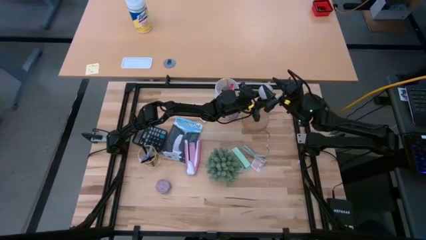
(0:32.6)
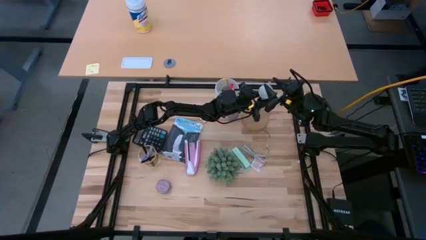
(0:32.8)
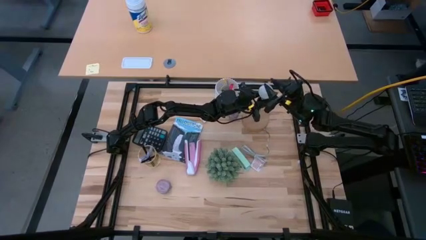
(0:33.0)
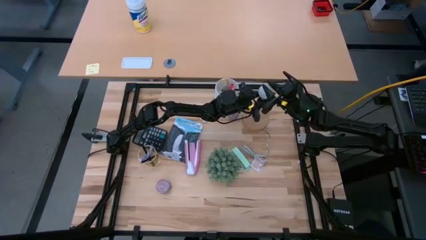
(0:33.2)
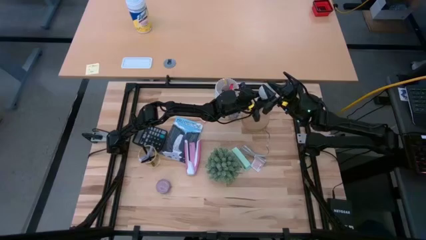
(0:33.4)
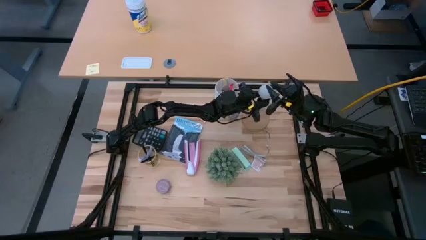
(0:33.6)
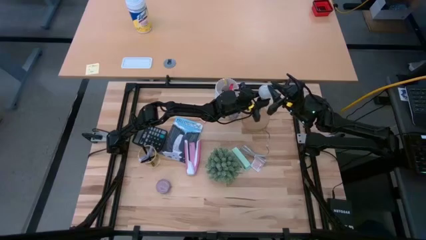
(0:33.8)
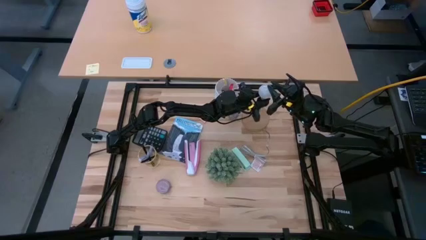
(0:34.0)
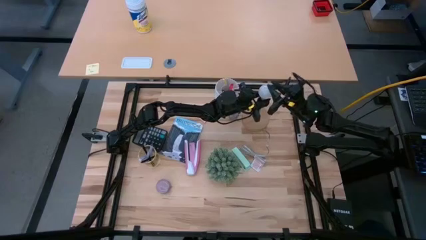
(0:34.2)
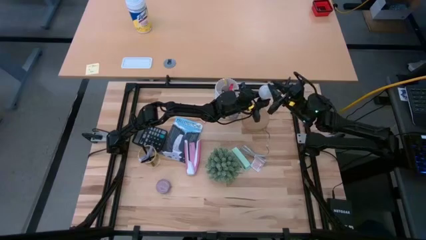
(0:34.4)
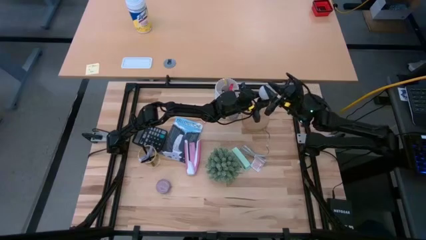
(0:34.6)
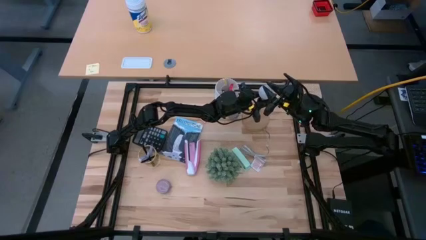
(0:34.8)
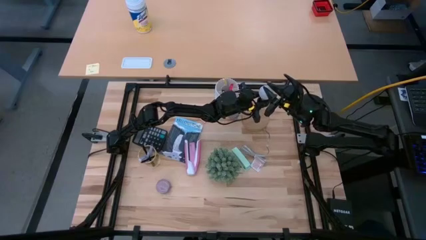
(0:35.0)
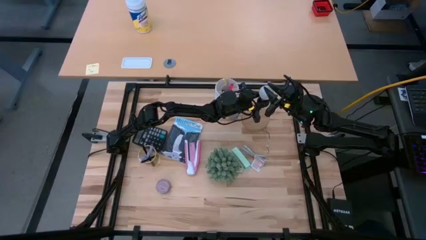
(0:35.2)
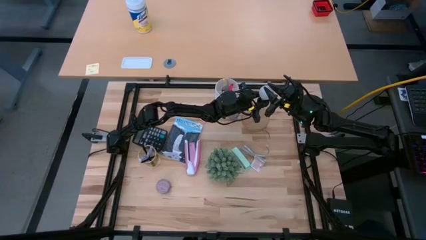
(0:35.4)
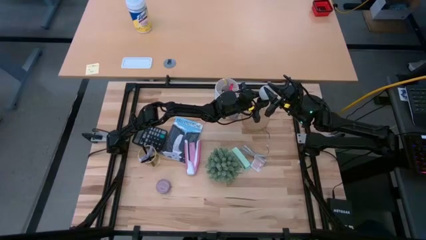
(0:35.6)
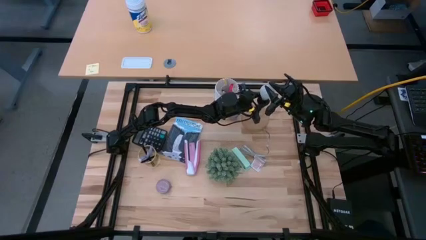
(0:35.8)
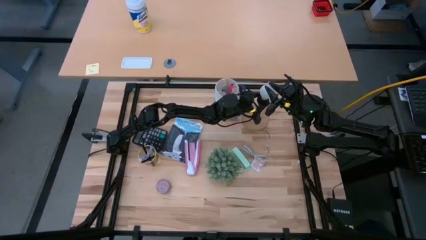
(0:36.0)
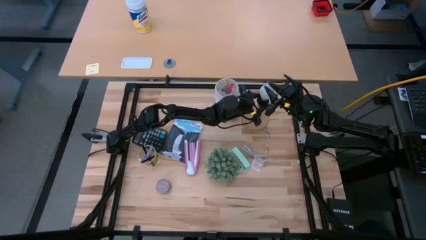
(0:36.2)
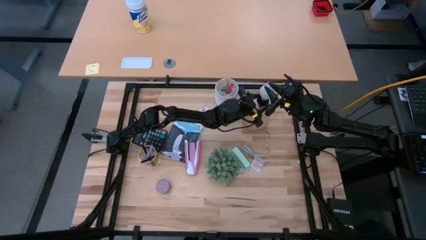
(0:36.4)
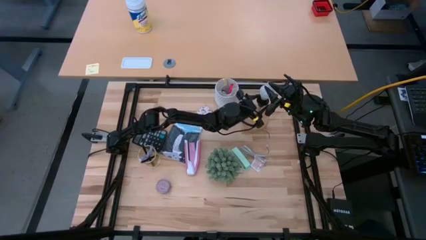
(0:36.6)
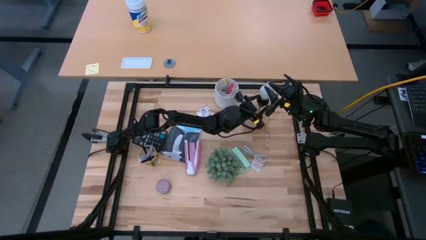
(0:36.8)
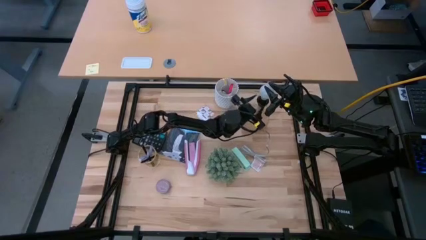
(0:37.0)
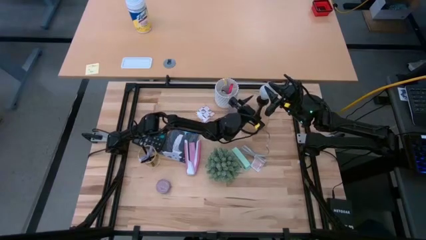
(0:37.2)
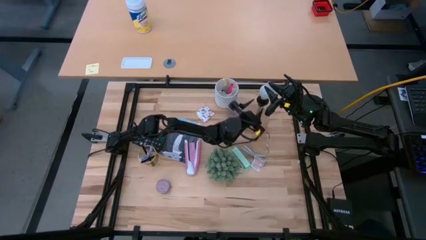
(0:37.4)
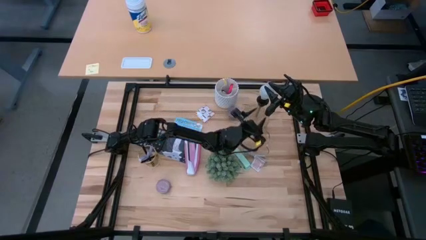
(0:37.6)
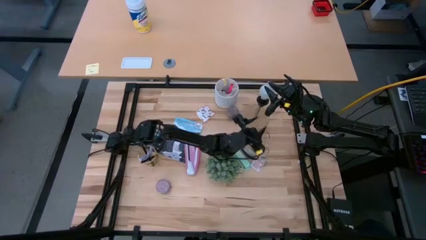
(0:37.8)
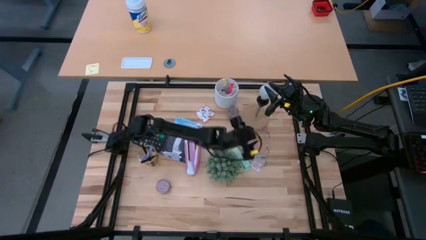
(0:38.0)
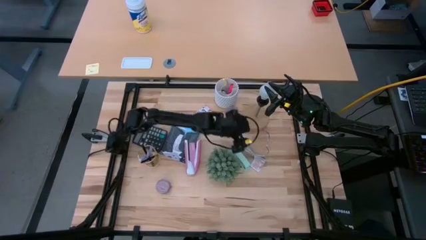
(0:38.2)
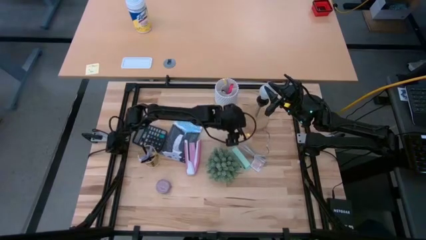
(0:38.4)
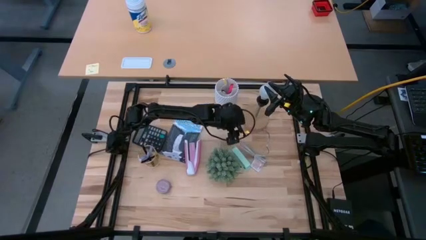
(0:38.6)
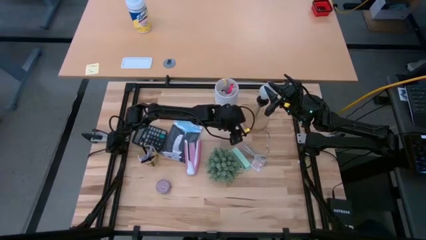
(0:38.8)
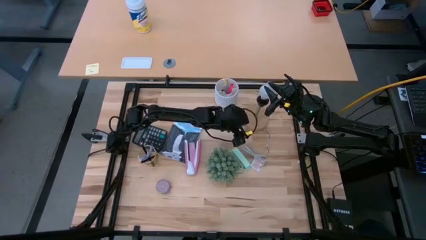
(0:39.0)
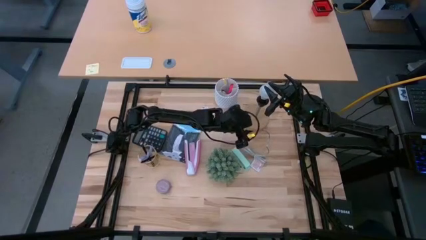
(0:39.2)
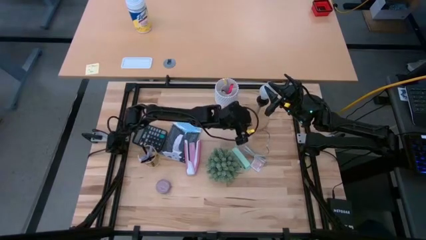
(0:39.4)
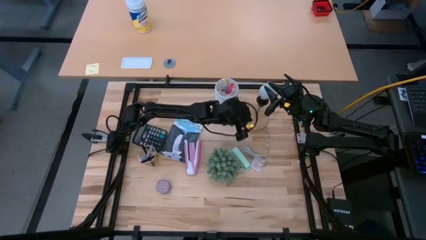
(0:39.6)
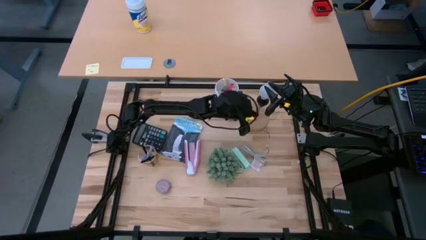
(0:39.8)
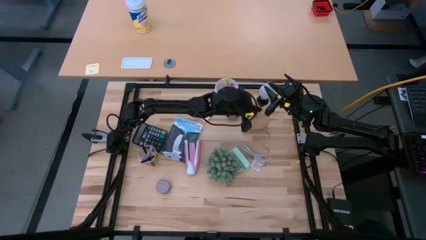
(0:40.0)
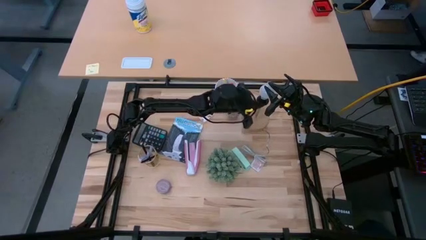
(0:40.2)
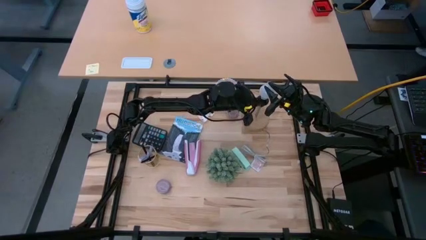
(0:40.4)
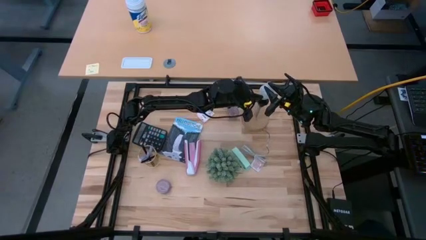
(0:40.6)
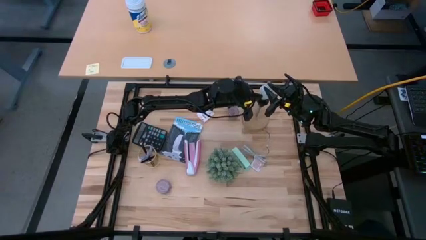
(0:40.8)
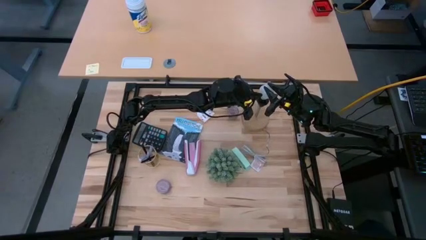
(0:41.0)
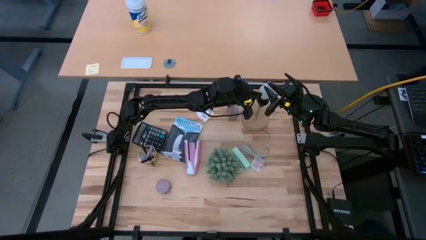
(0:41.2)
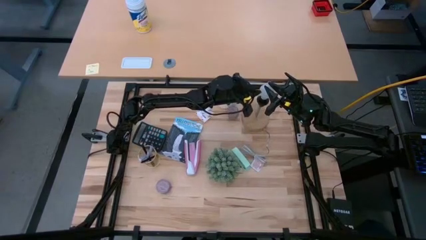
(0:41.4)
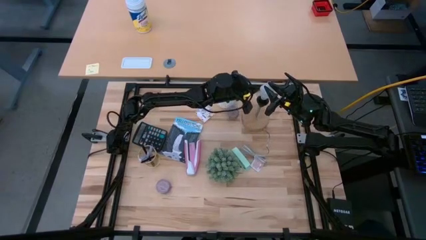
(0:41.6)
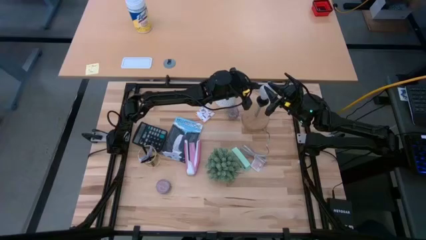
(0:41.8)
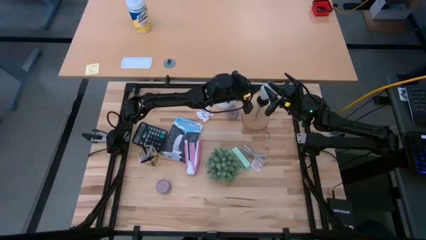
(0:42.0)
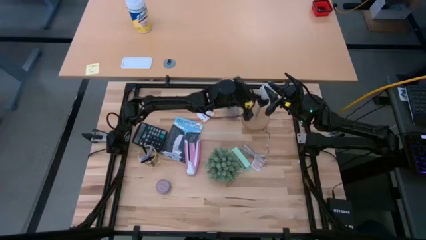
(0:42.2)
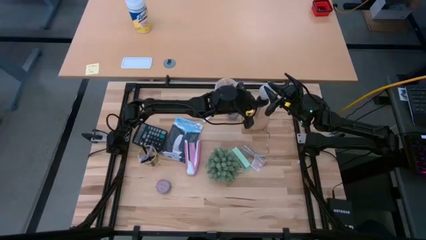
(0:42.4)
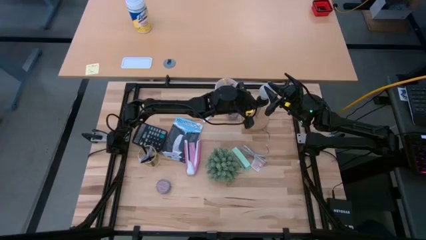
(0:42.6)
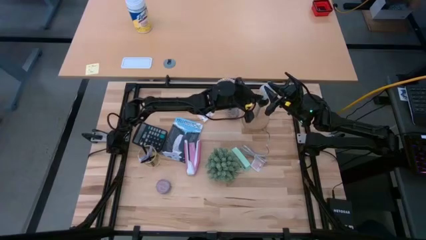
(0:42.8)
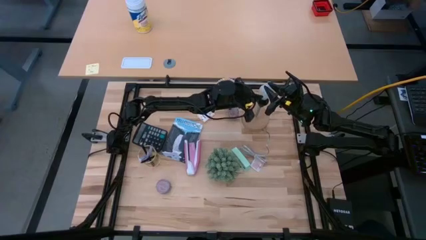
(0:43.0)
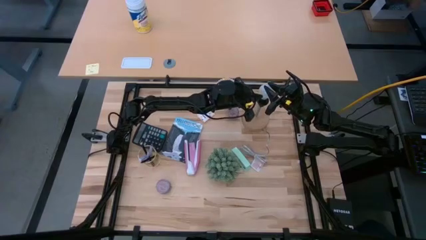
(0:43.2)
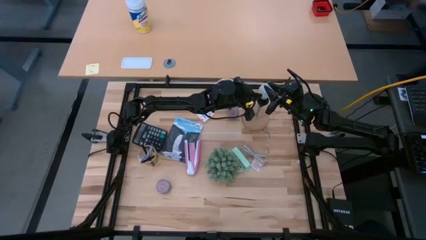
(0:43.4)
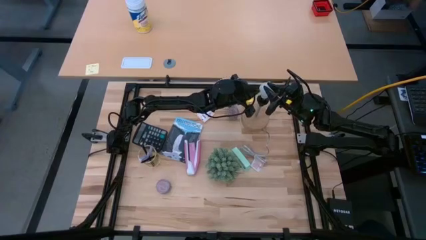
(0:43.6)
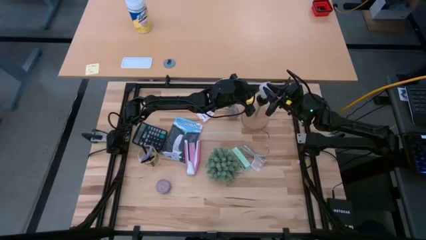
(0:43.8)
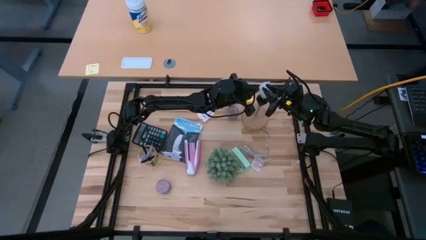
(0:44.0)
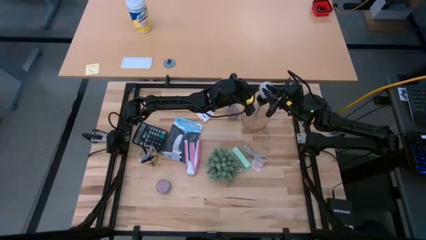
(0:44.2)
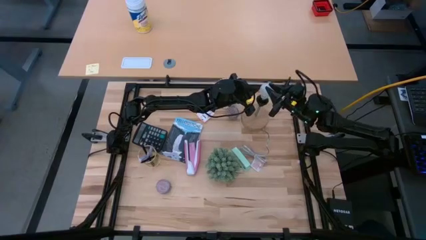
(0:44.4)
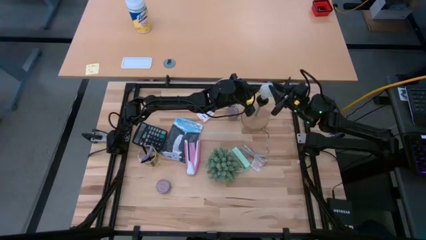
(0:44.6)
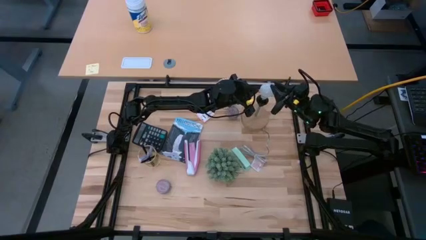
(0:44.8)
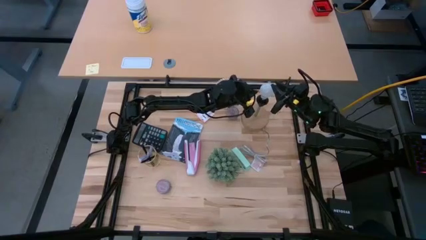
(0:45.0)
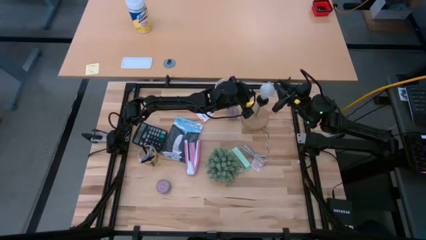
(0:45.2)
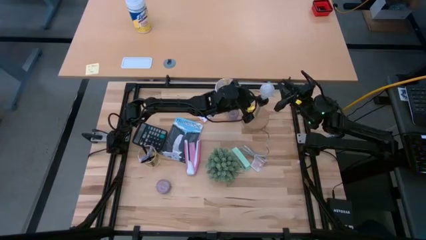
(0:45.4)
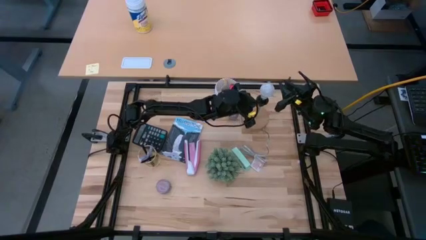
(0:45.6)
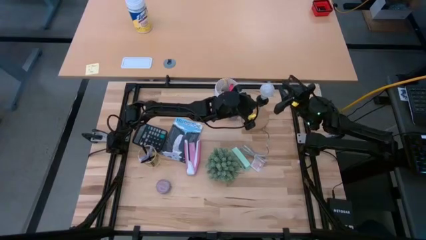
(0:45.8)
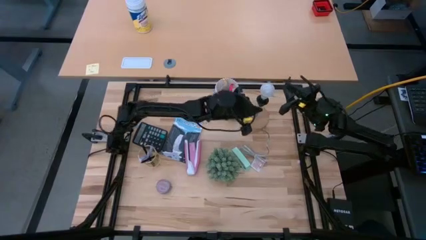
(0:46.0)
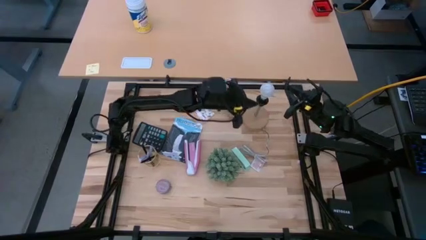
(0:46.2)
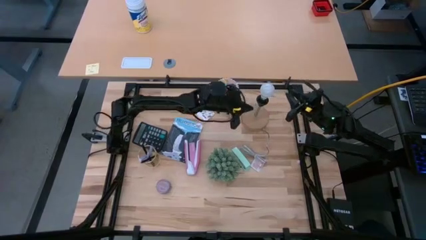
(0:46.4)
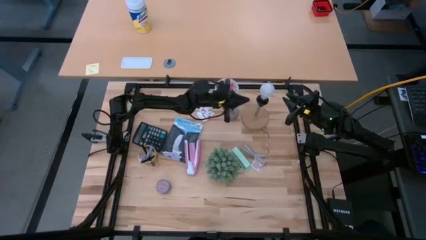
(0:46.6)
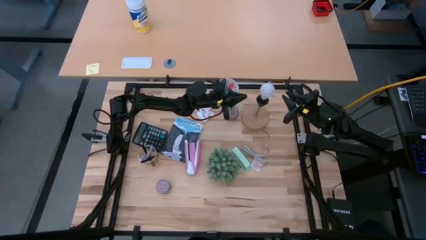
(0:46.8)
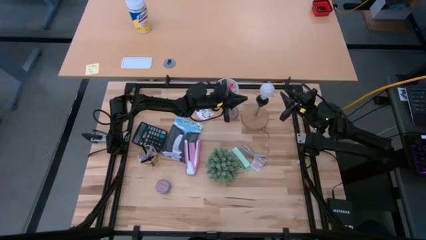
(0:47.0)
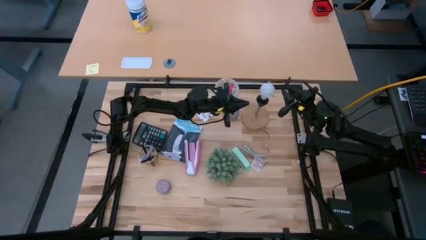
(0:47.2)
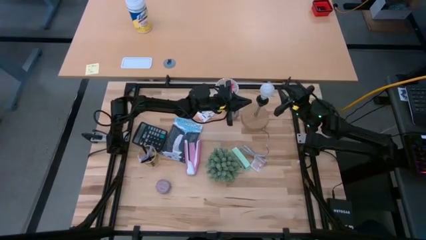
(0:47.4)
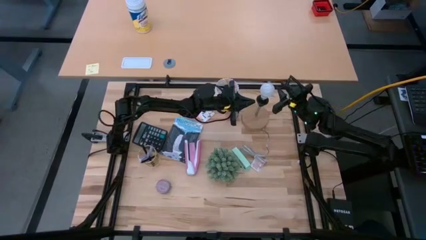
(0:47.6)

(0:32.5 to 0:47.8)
Task: Screw lightbulb
Insert the lightbulb into the lamp
